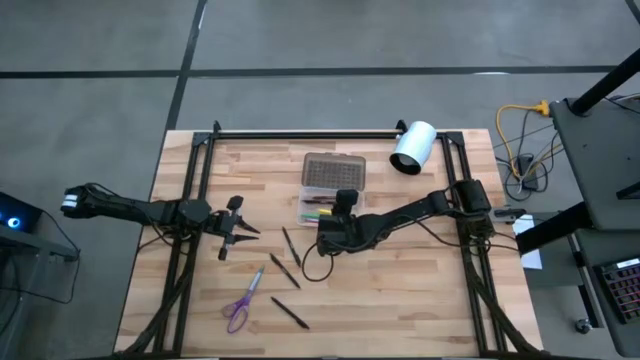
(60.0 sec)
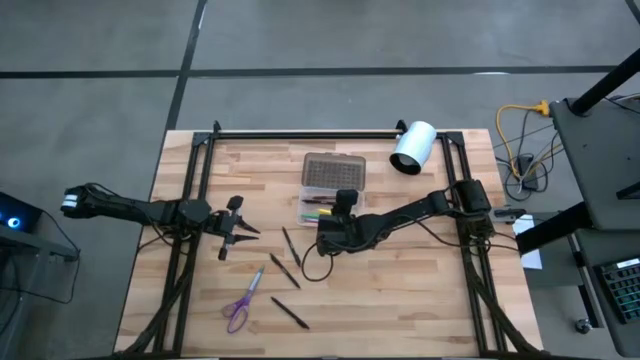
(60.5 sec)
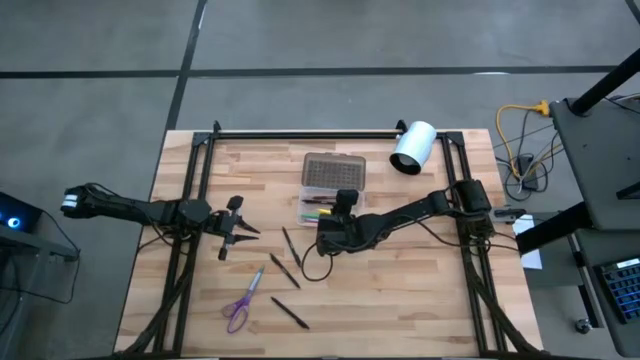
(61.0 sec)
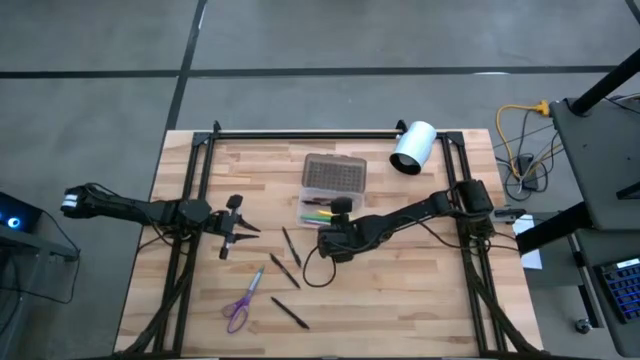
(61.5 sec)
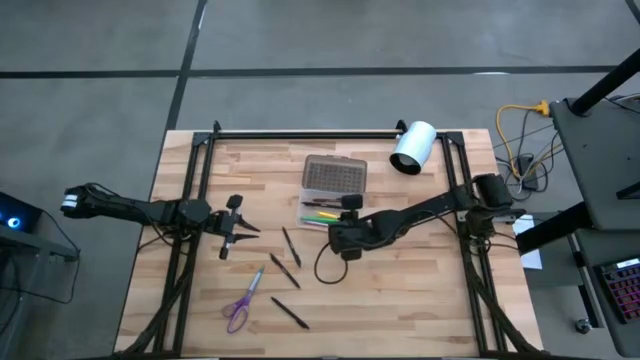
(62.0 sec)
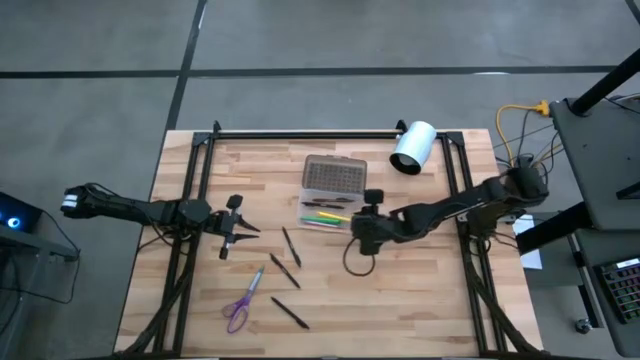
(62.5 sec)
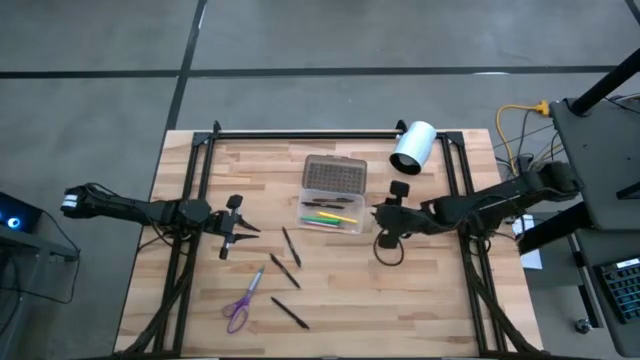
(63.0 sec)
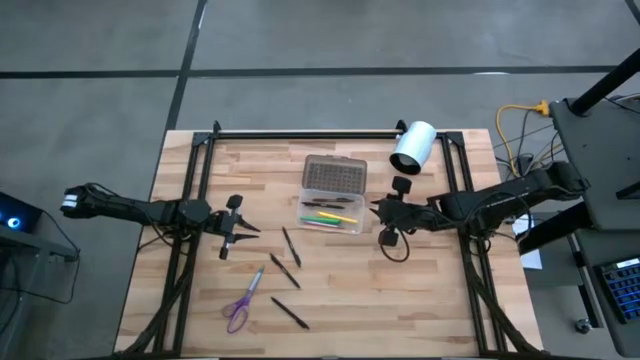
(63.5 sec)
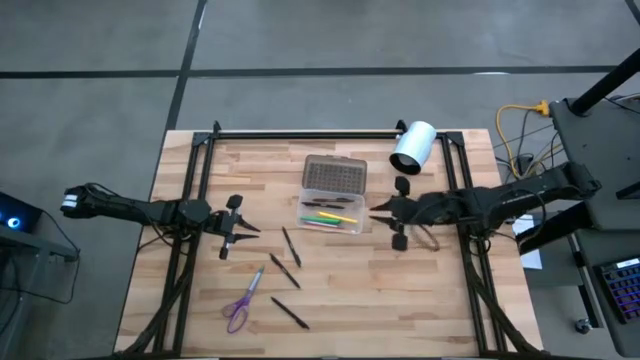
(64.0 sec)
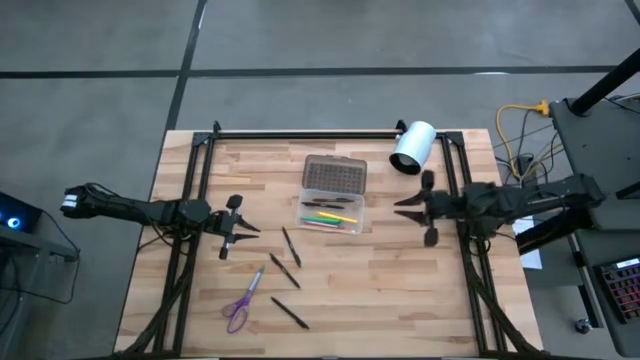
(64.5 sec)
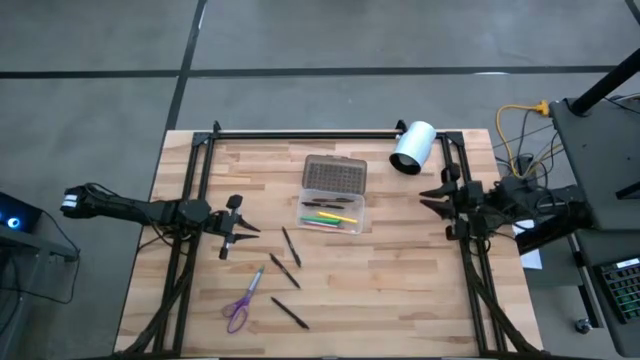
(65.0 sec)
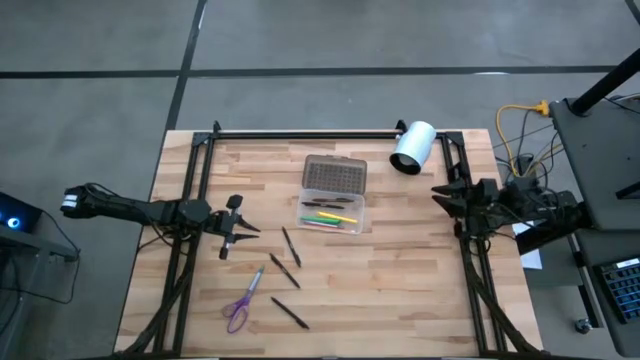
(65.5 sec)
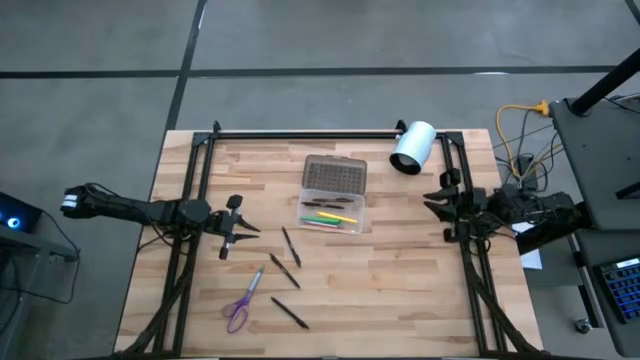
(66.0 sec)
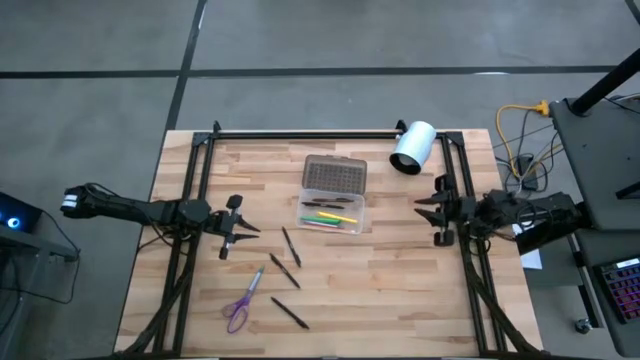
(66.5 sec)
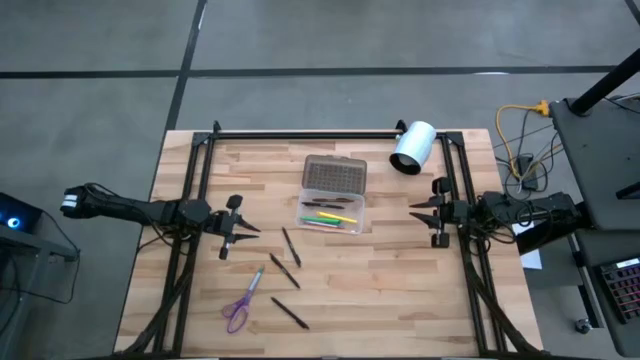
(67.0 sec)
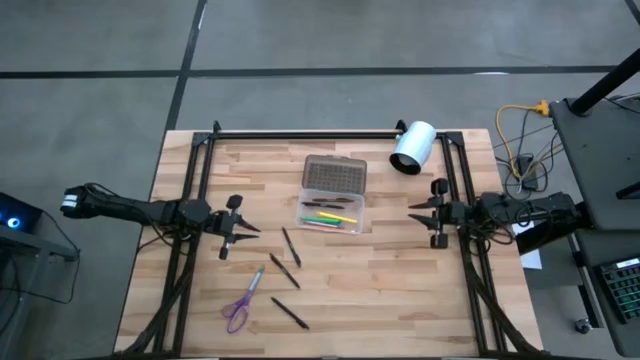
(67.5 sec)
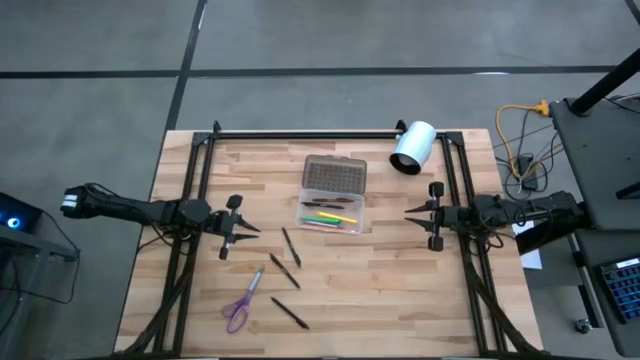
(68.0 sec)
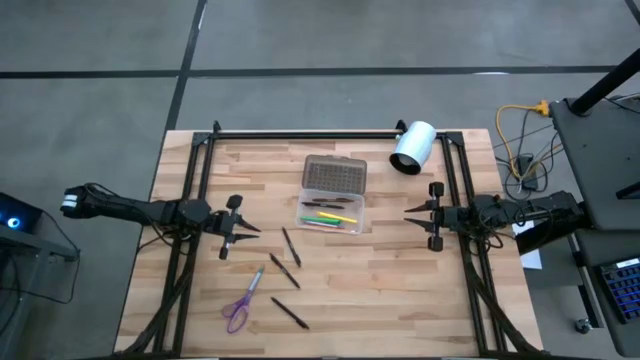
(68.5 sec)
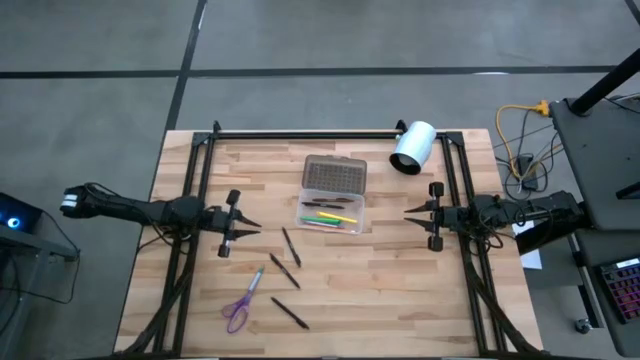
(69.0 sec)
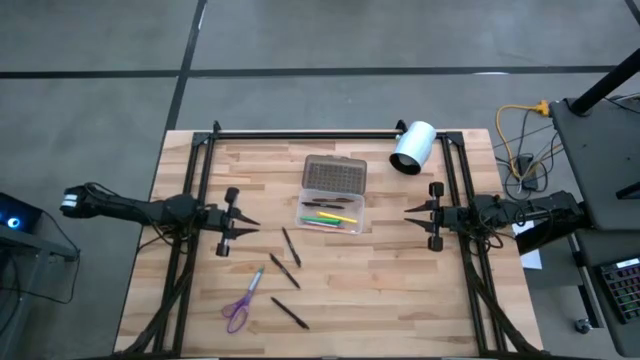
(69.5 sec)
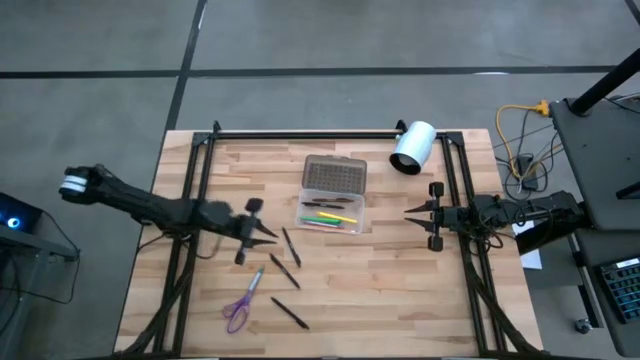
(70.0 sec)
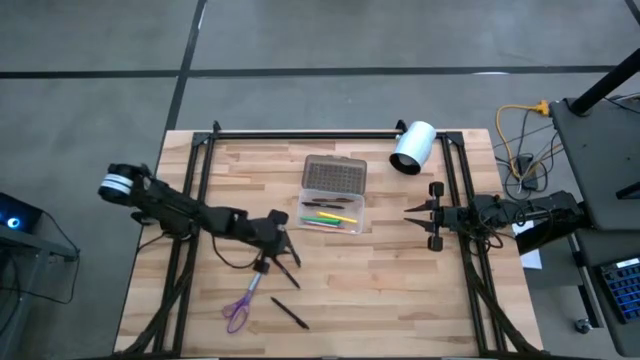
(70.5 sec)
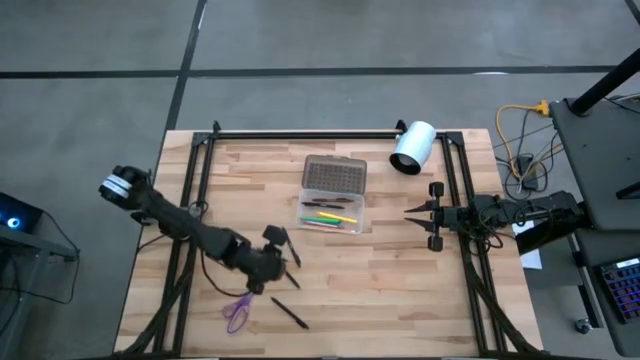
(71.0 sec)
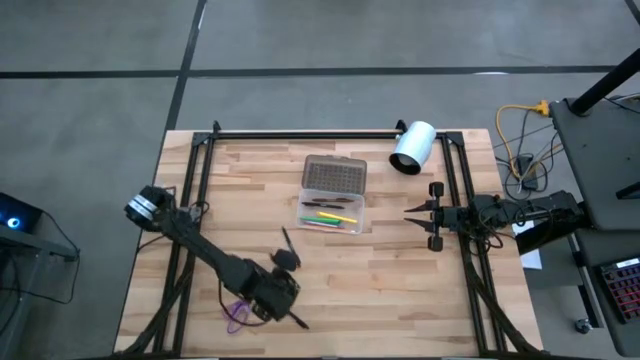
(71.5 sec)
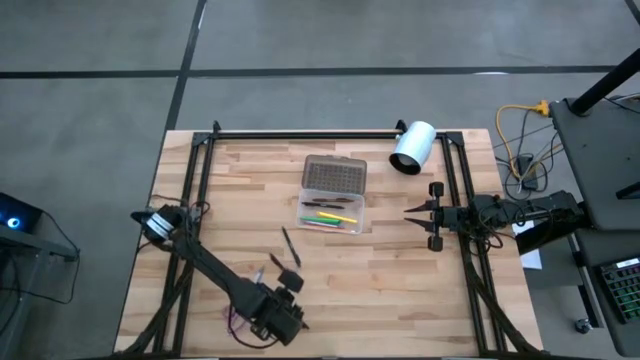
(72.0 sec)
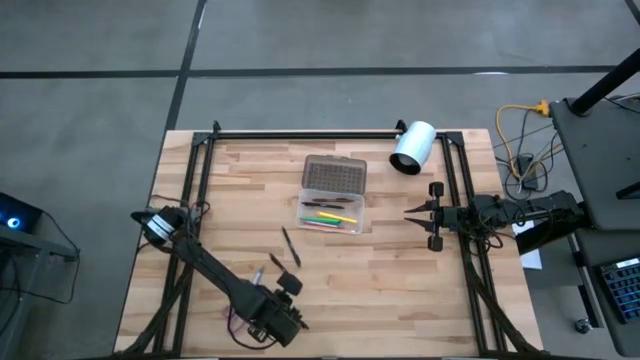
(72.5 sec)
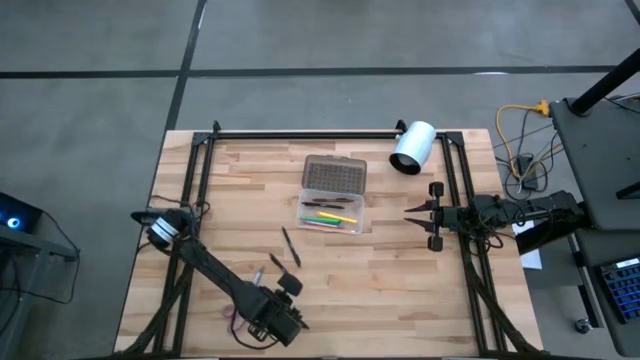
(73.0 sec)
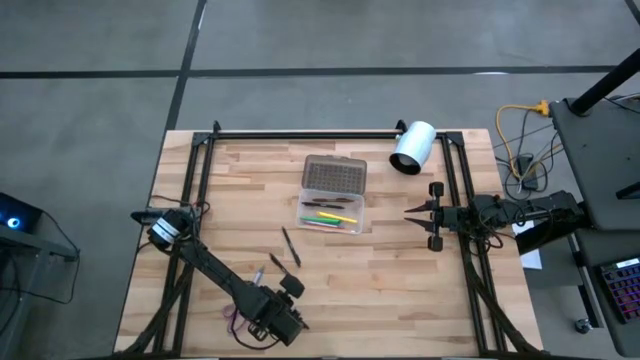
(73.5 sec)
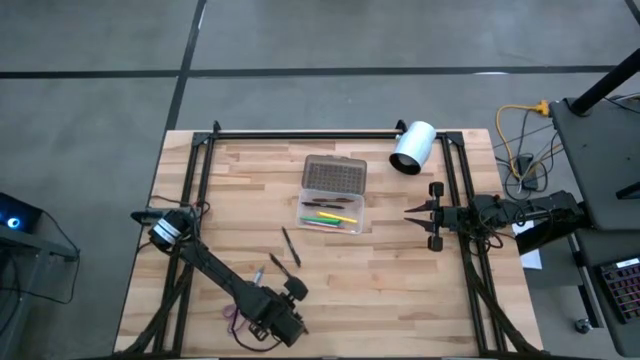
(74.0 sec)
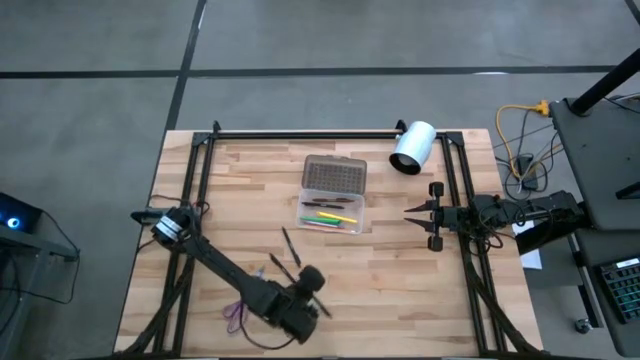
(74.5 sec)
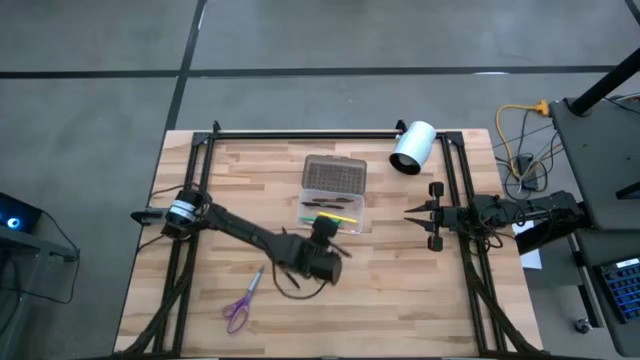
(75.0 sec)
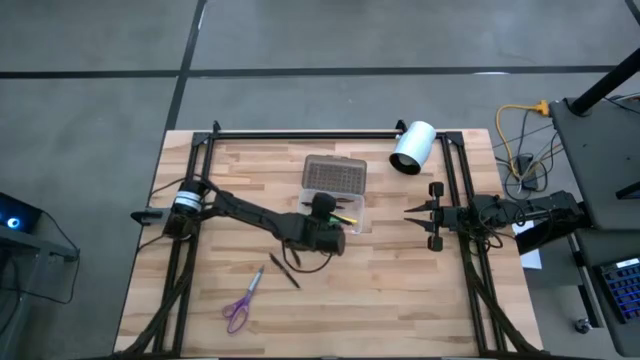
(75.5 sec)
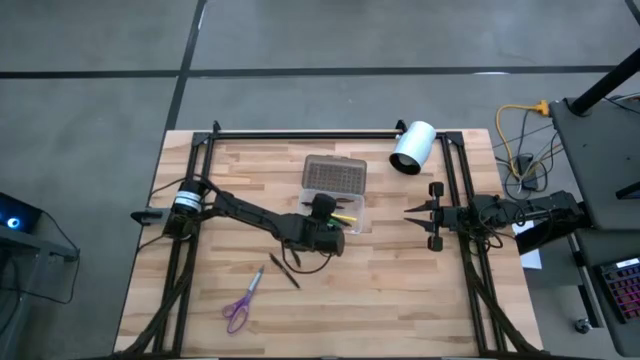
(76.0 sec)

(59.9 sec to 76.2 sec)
Task: Pick & place school supplies into a supply box
Put the black pen into the black supply box

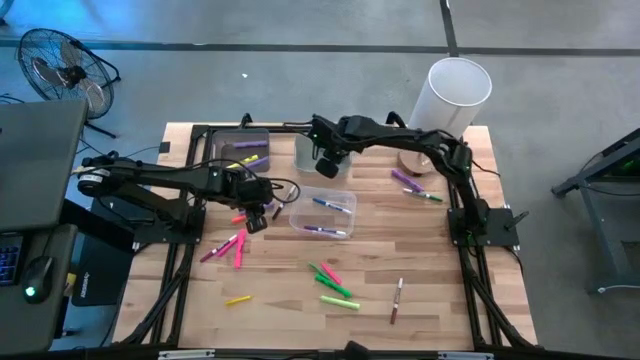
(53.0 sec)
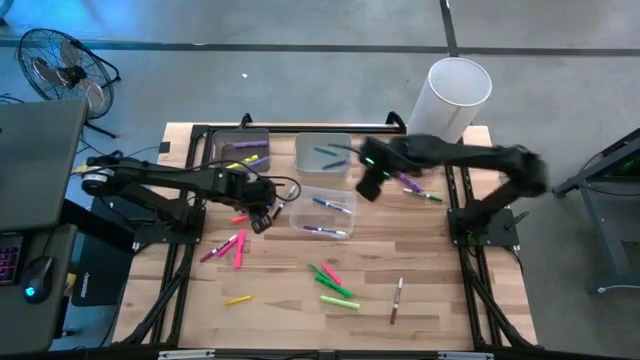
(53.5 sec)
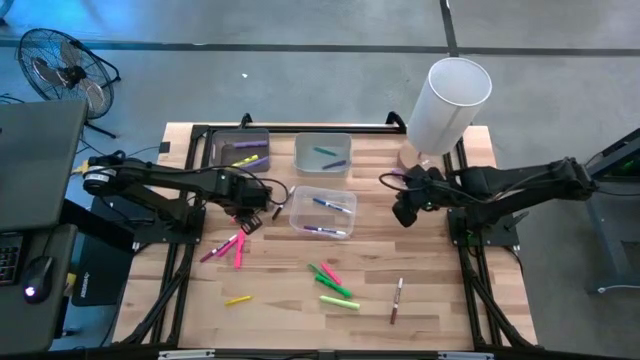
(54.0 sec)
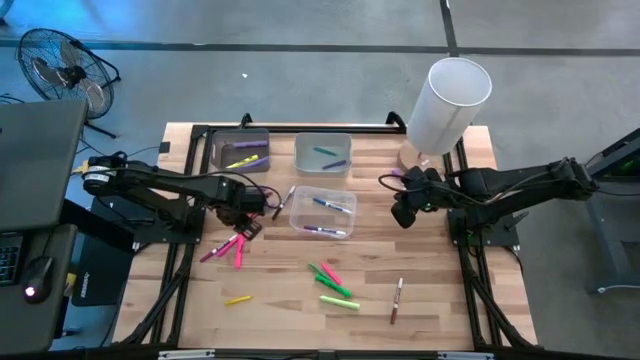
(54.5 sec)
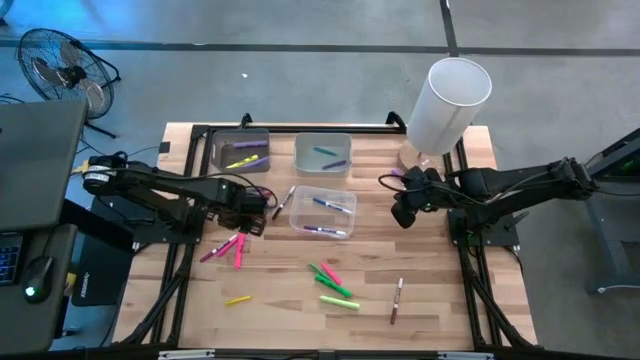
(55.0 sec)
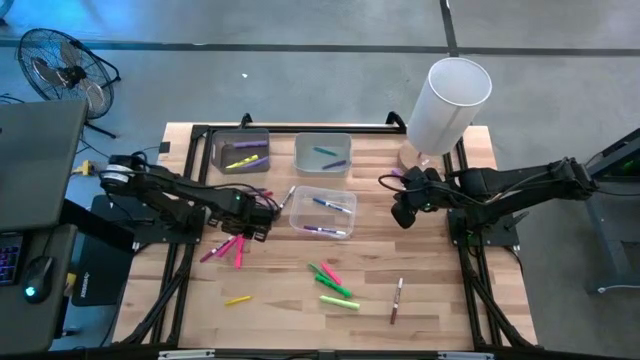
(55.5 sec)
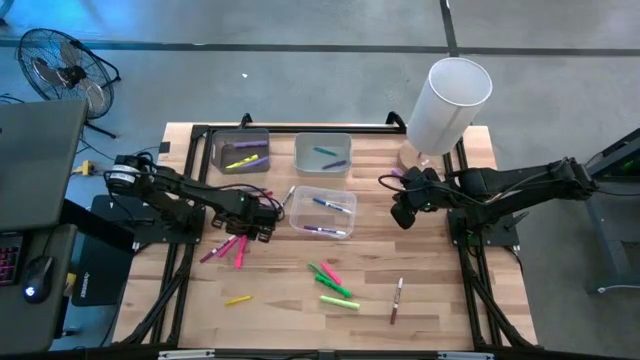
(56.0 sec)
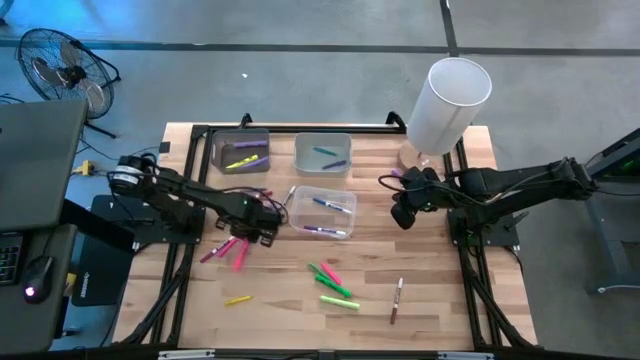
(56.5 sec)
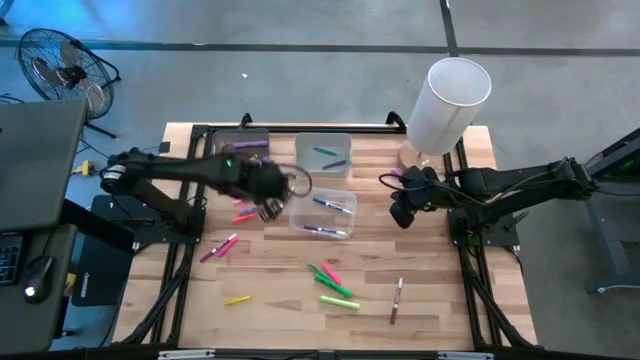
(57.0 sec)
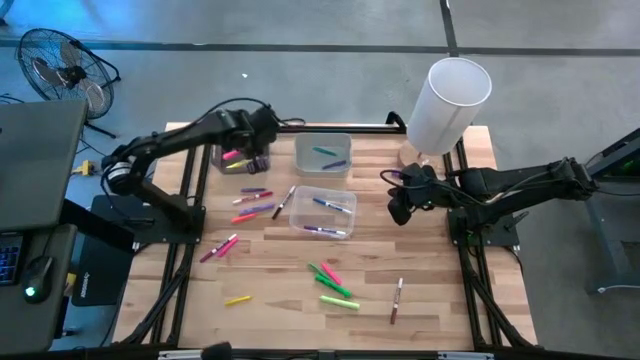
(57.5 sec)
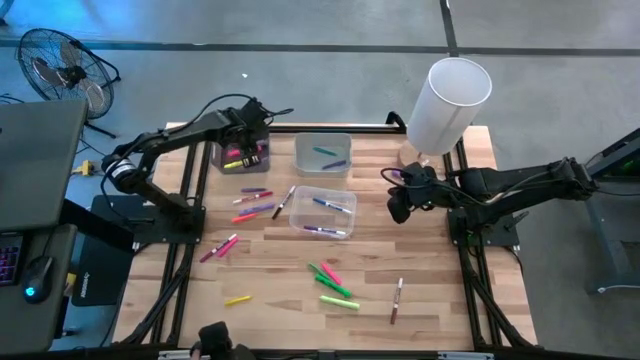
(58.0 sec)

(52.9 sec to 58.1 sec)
Task: Pick & Place Markers
Put the pink highlighter into the black bin
